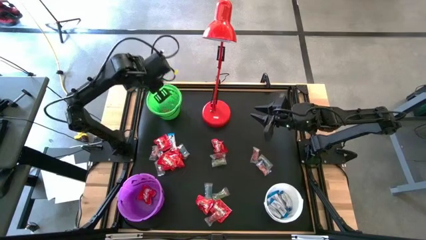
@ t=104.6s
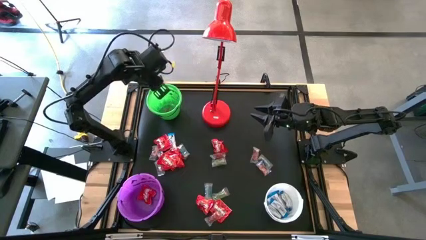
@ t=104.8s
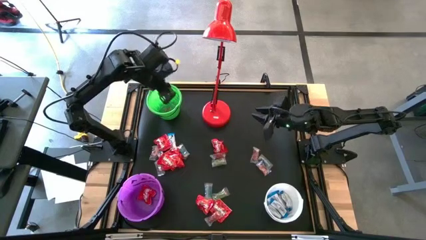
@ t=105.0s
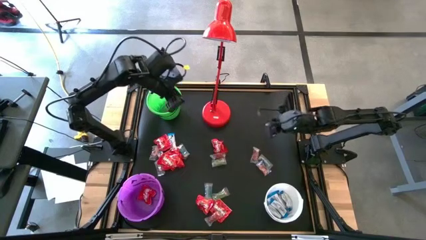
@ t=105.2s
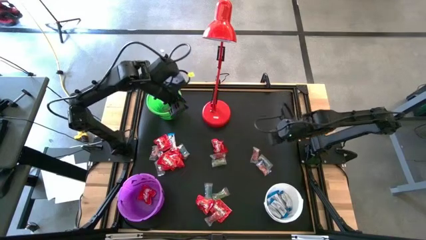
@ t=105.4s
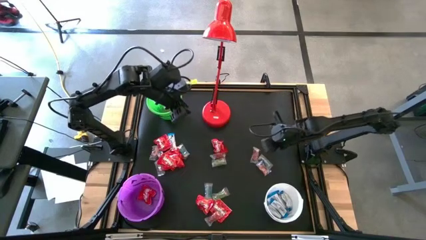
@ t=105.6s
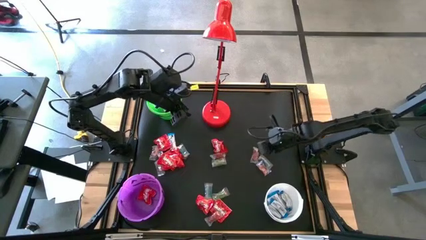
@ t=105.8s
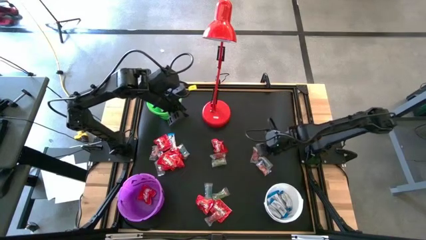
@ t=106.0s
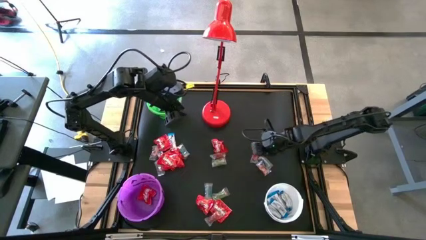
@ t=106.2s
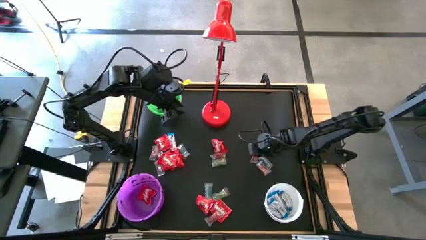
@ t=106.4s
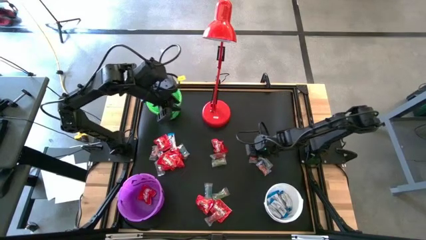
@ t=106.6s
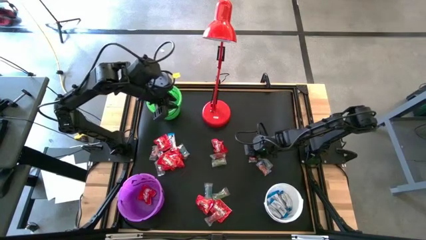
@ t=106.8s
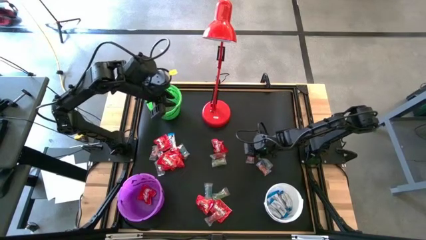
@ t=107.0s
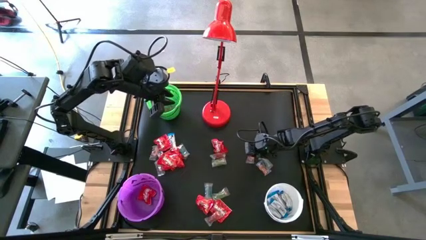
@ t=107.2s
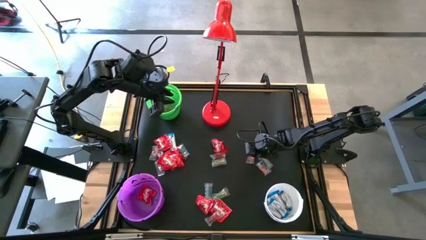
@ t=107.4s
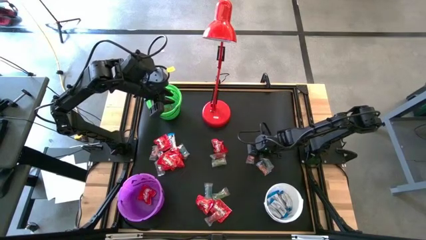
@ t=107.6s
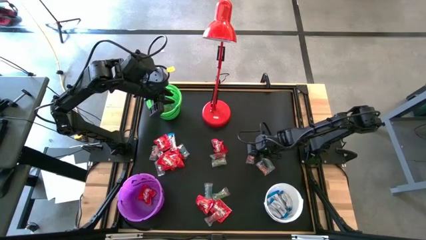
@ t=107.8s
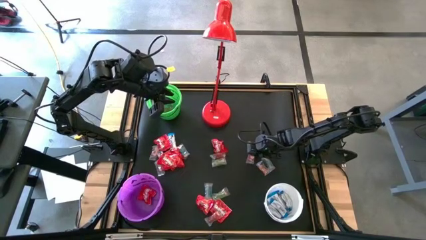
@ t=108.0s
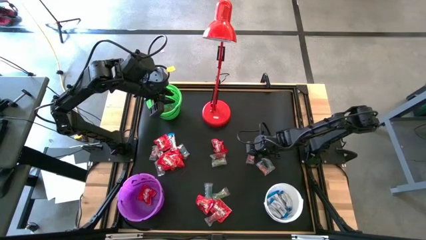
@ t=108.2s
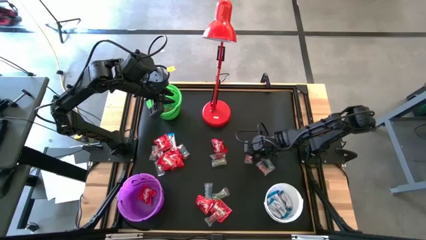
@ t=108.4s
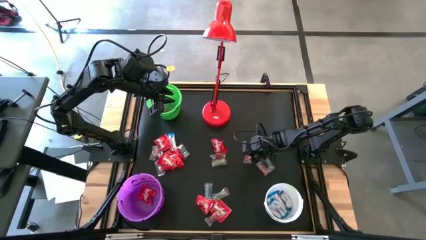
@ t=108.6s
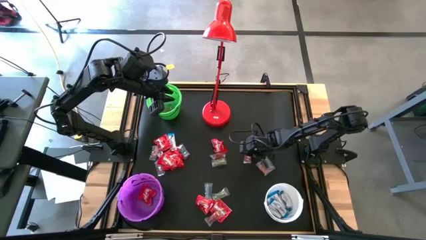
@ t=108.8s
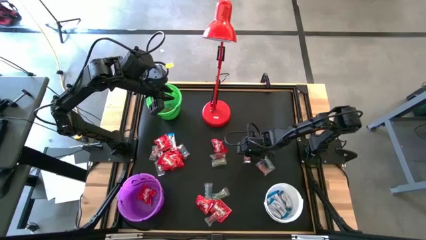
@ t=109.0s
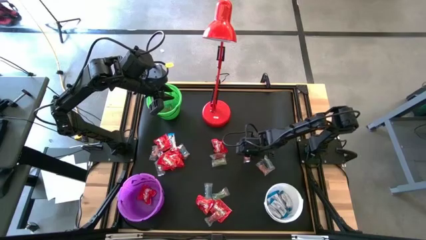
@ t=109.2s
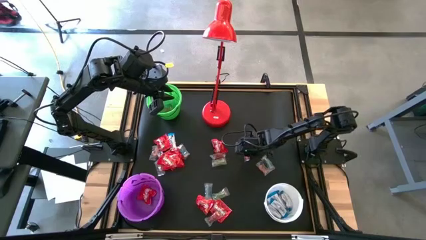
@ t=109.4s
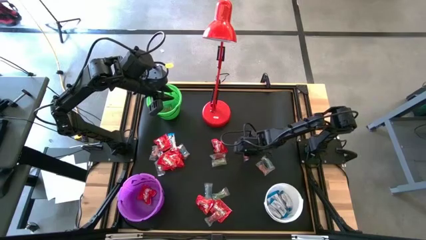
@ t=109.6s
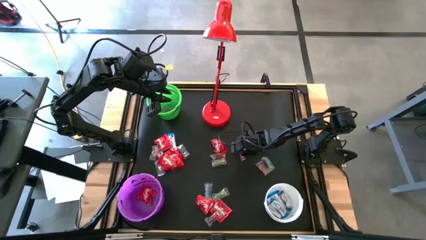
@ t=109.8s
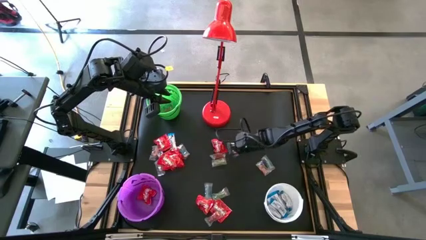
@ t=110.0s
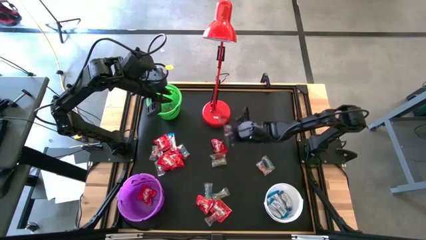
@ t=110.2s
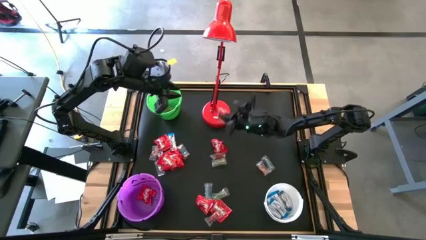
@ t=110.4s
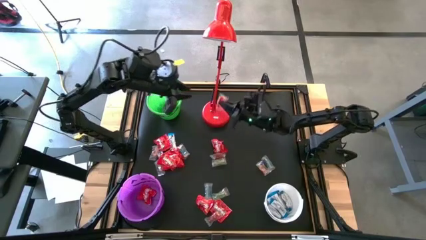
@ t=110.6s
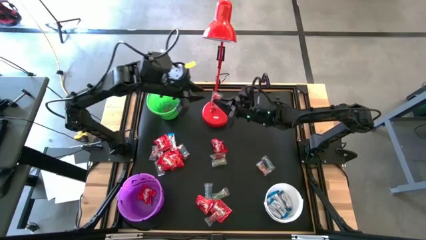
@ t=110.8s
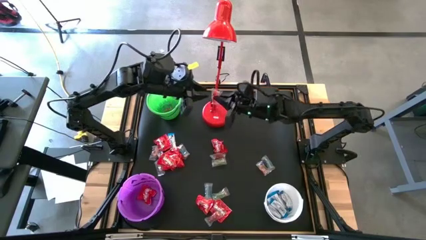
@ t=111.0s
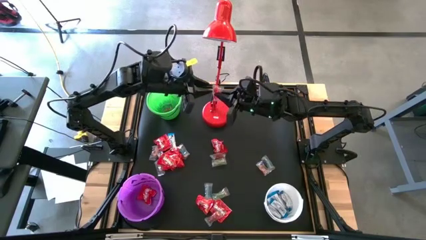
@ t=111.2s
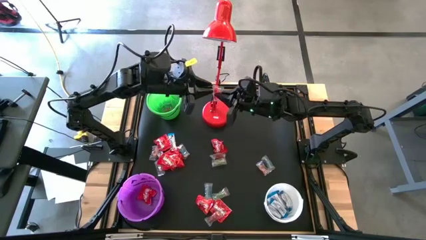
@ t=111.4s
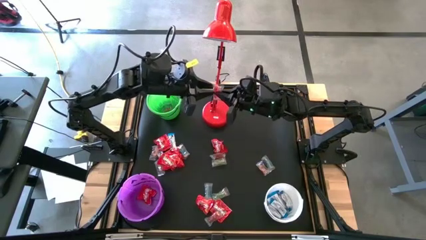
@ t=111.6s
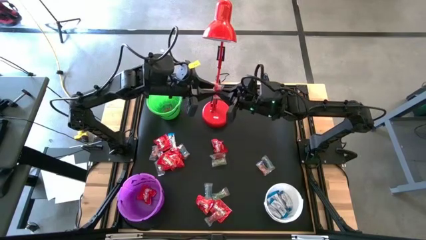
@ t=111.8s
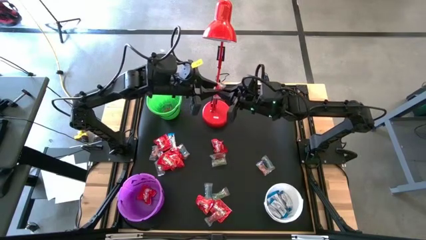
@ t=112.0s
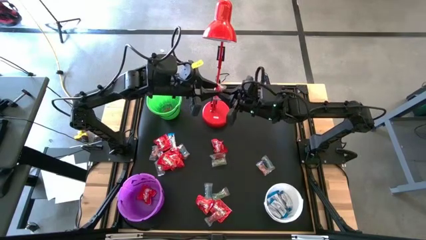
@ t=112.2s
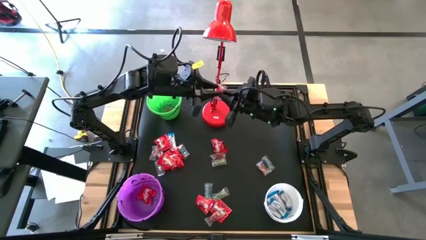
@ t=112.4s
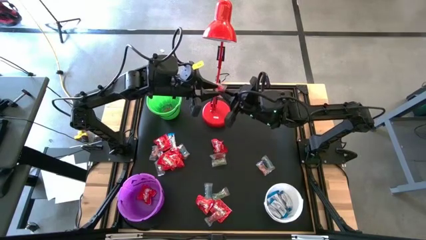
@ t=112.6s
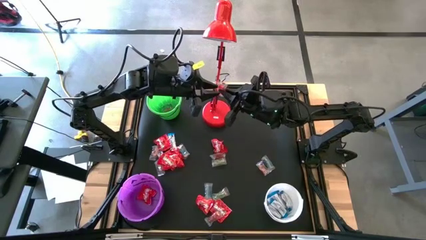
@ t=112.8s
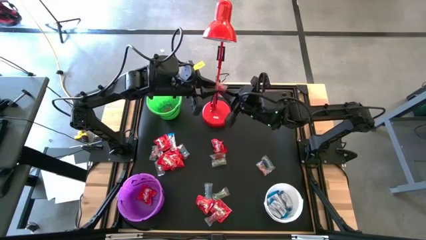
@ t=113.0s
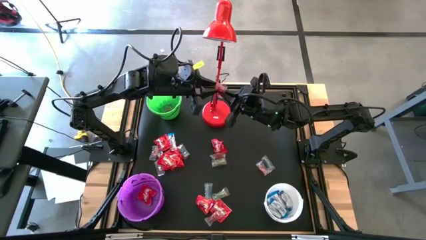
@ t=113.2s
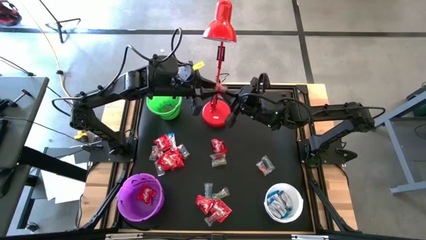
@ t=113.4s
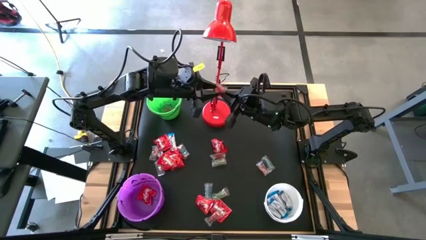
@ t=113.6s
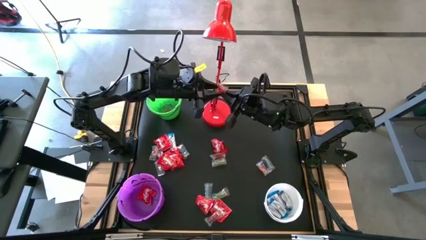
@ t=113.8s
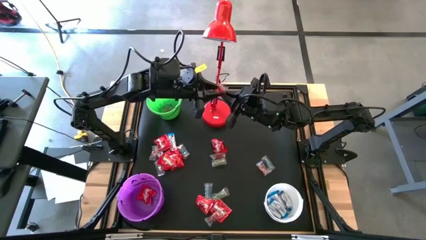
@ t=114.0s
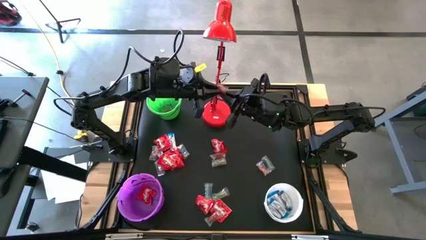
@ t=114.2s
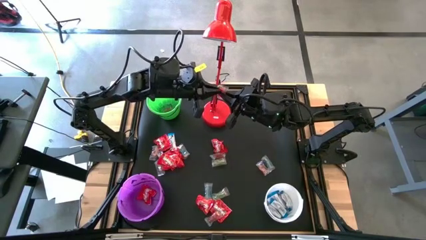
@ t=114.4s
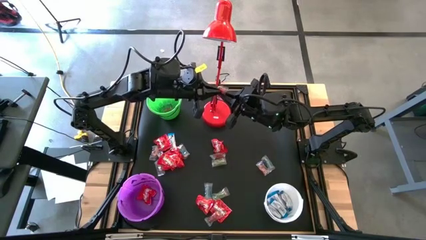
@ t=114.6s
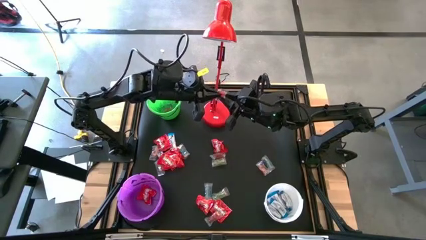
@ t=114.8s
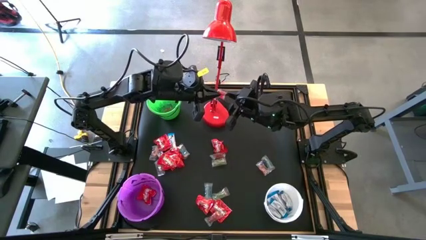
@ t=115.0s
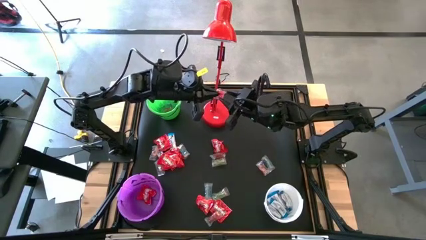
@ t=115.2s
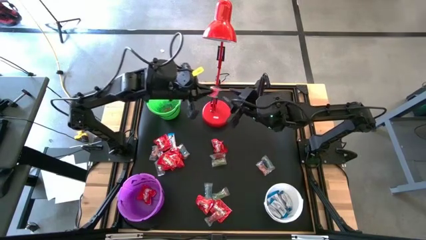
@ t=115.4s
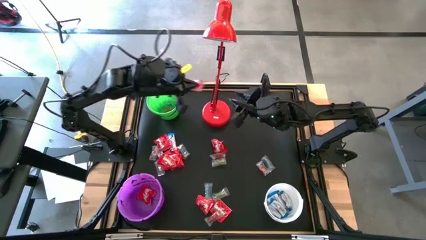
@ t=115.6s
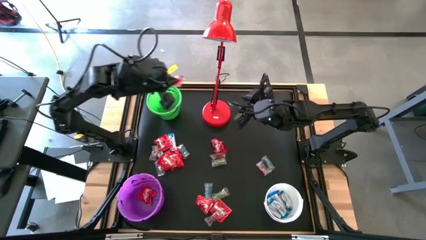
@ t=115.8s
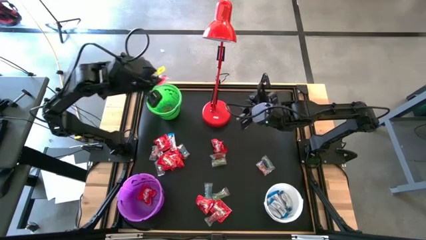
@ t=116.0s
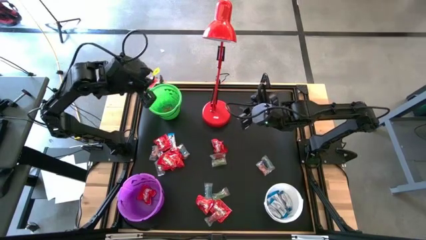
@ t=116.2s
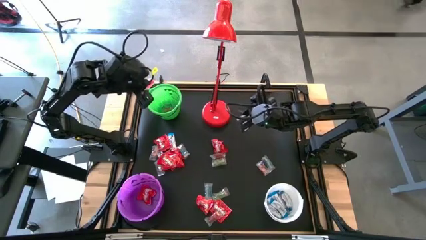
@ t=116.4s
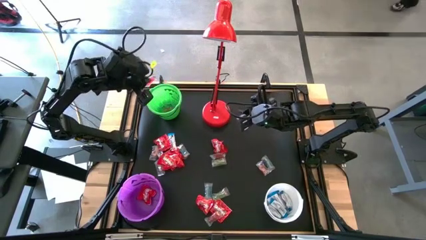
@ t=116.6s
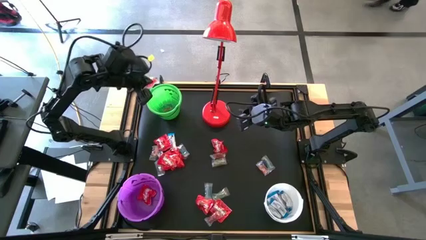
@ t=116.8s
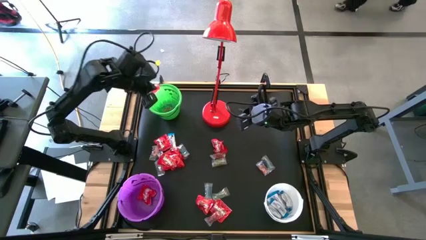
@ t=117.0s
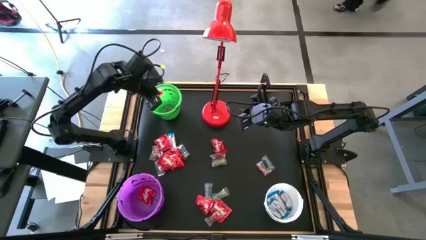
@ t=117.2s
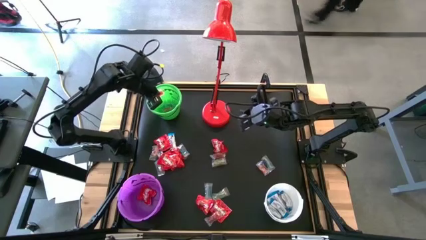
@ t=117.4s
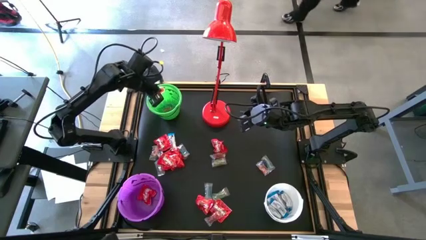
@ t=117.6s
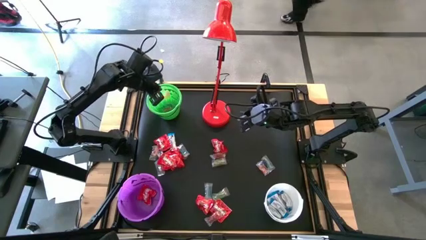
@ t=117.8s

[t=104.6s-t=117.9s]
Task: Sort candy
Put the red gummy into the green bucket

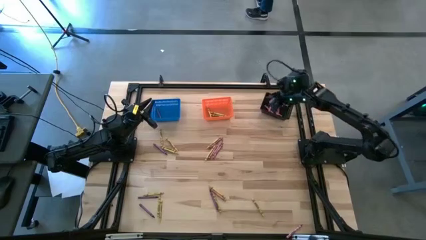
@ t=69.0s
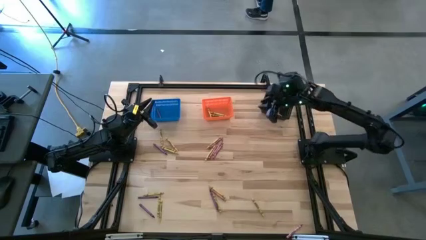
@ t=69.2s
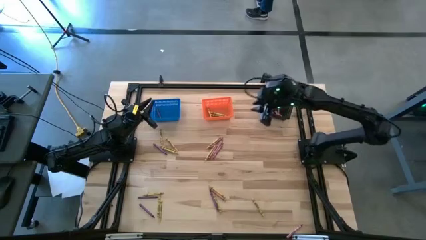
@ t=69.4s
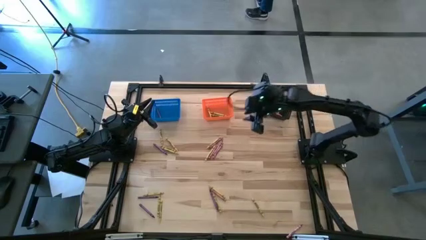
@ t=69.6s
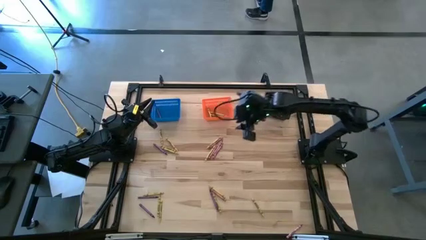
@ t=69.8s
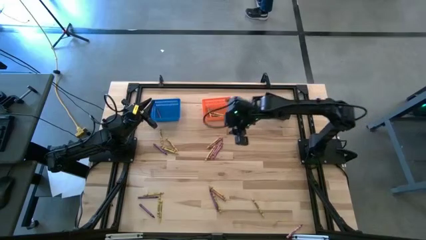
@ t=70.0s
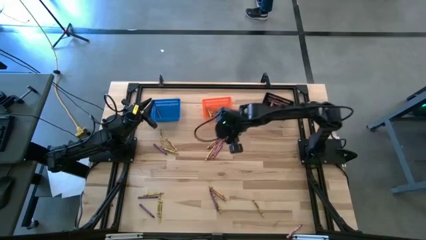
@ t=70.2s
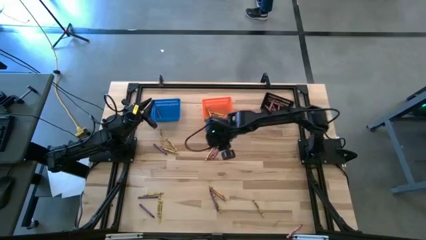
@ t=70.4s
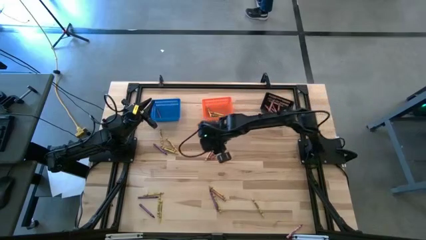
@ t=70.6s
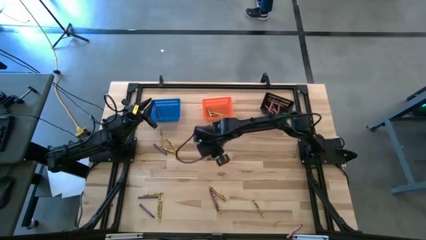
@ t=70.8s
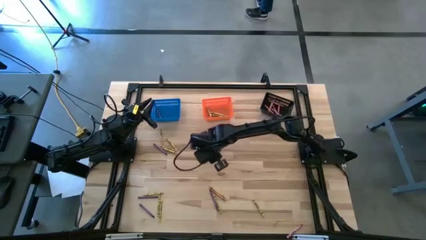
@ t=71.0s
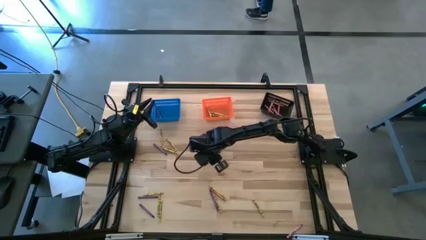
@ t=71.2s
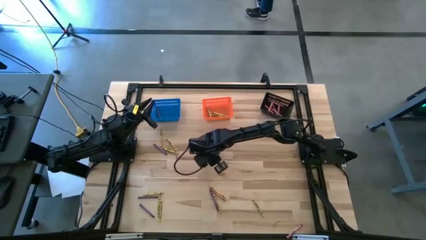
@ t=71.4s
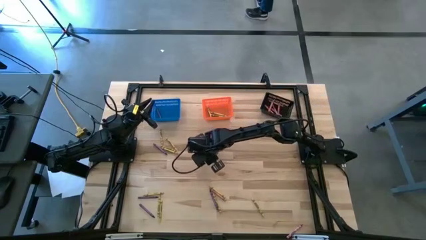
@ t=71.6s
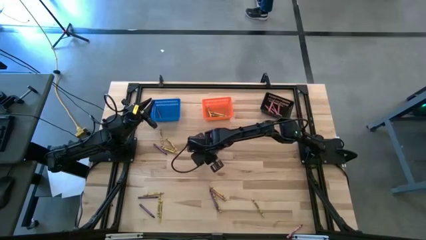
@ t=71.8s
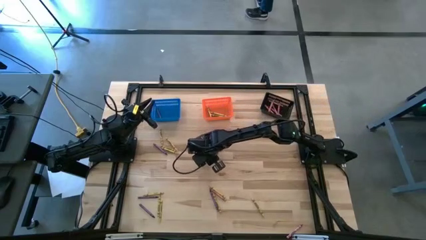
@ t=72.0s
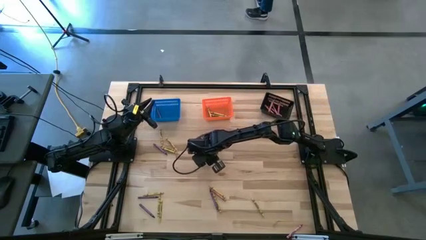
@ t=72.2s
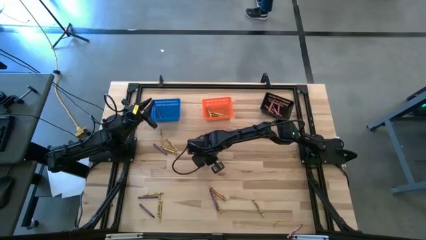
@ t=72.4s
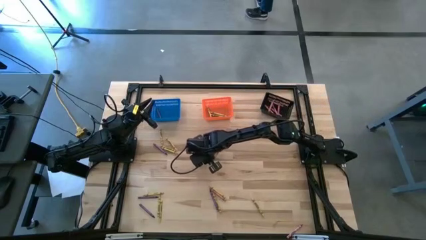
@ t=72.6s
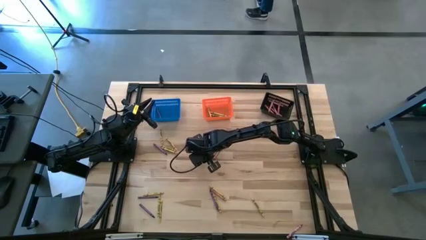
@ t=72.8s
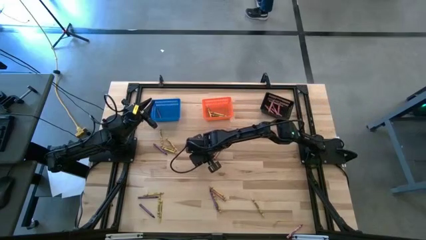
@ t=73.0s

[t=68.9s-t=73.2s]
Task: Sort crayons
Put the yellow crayon into the orange bin
